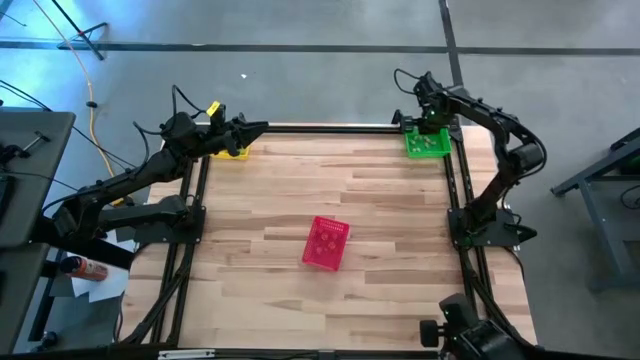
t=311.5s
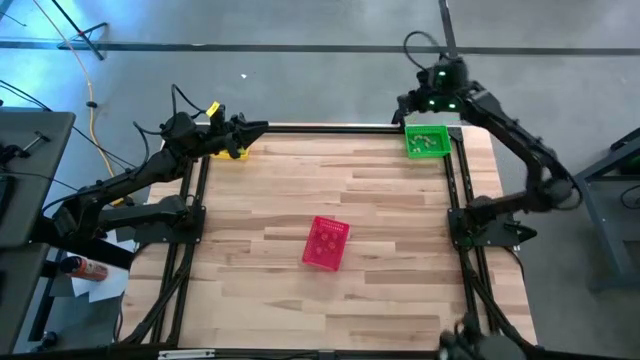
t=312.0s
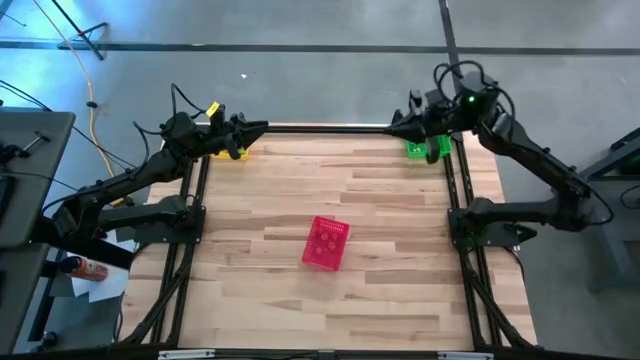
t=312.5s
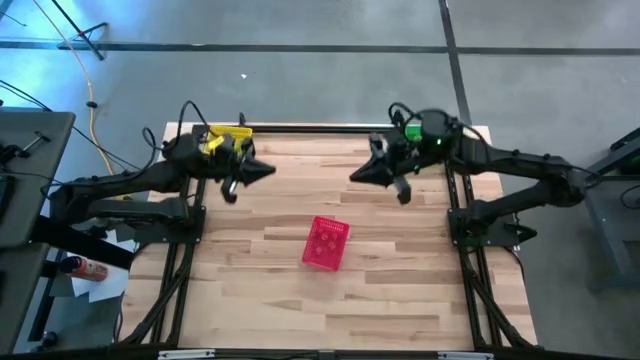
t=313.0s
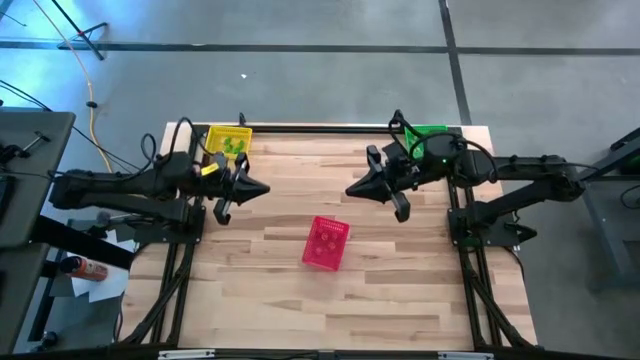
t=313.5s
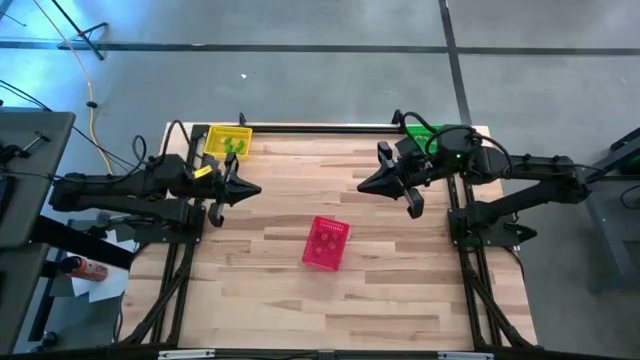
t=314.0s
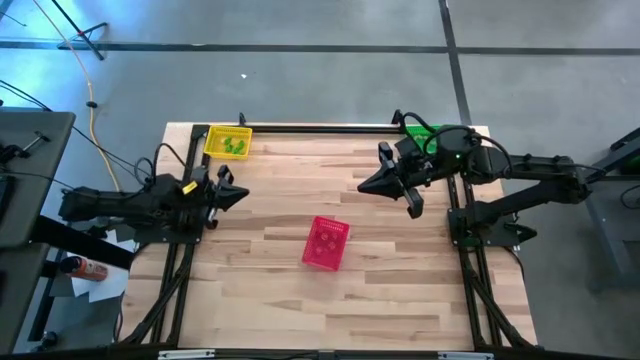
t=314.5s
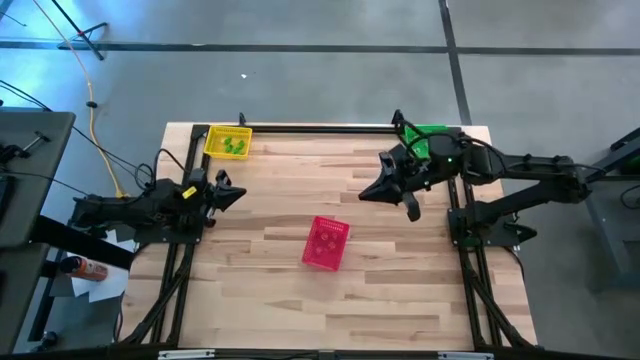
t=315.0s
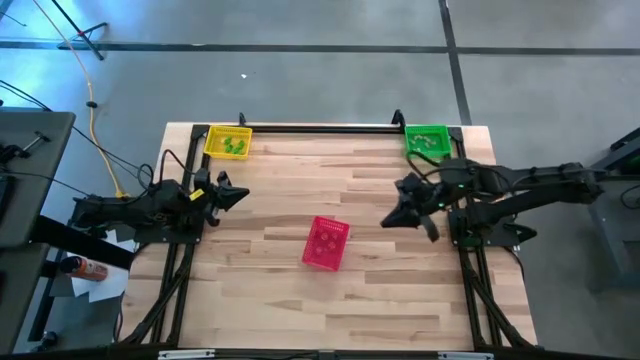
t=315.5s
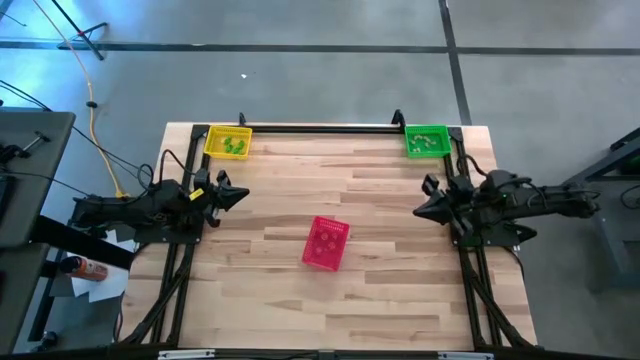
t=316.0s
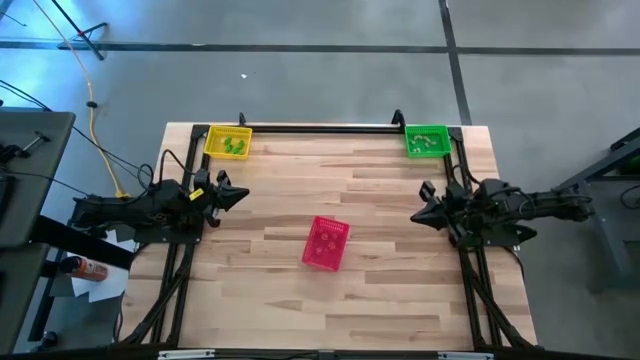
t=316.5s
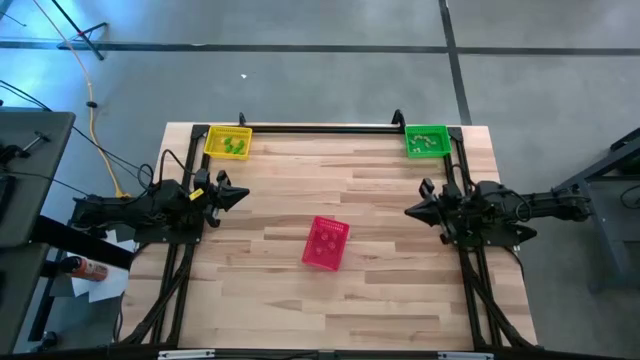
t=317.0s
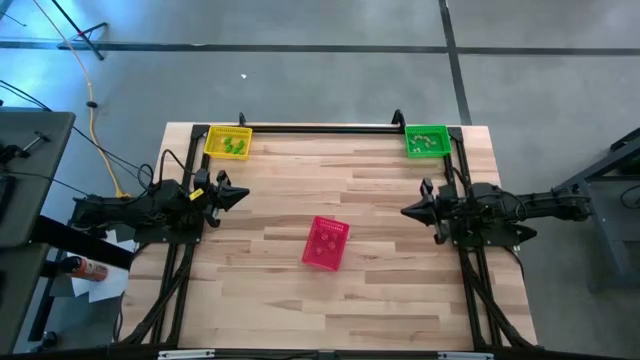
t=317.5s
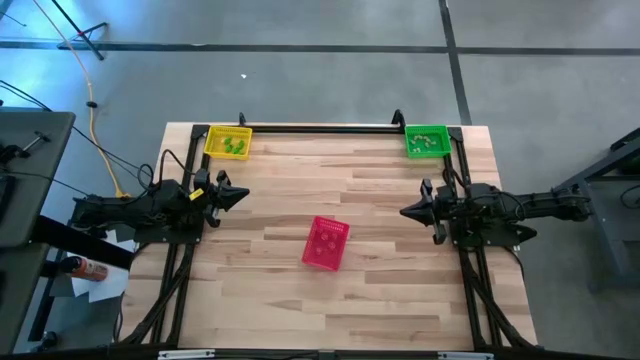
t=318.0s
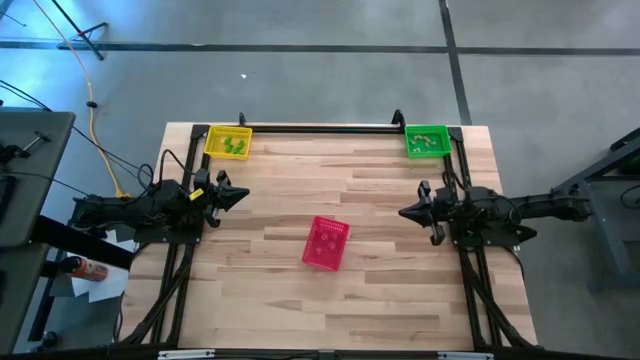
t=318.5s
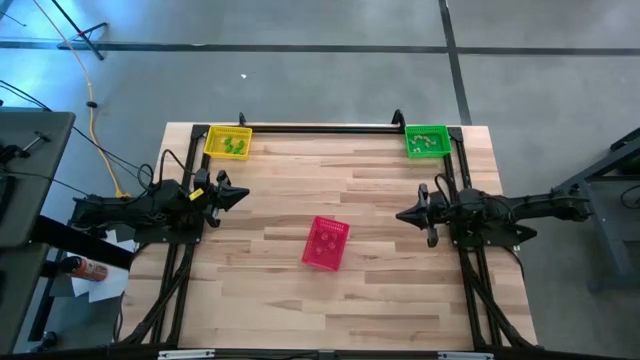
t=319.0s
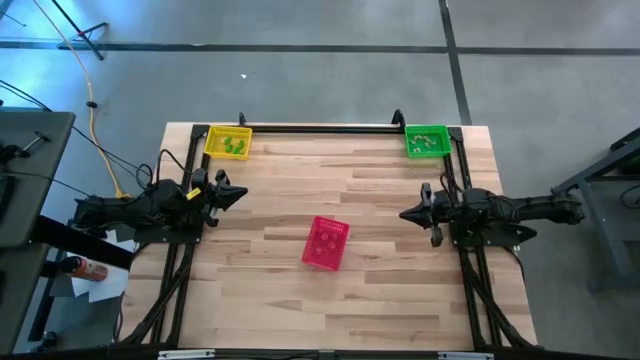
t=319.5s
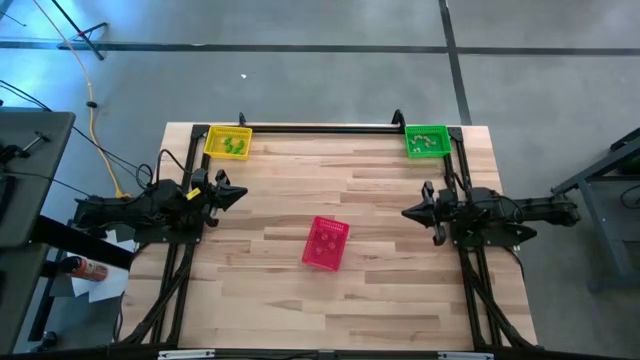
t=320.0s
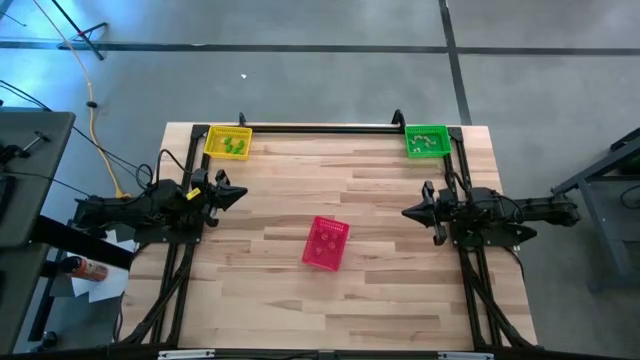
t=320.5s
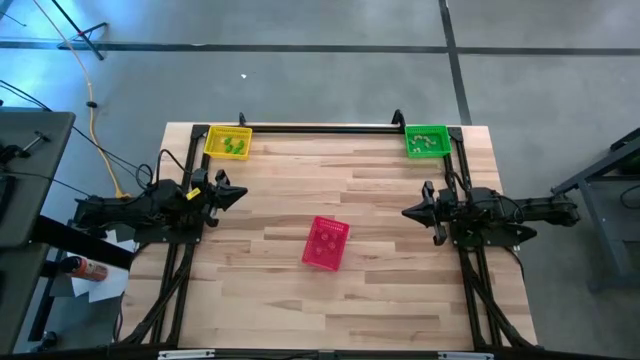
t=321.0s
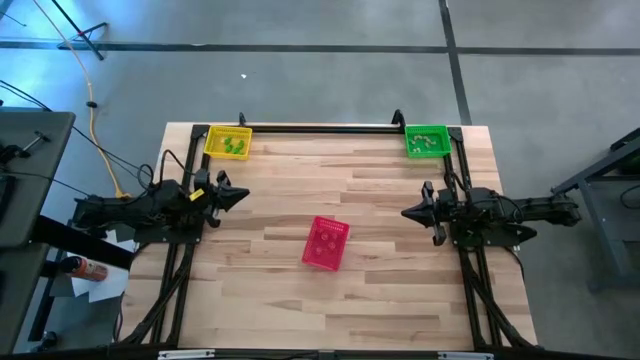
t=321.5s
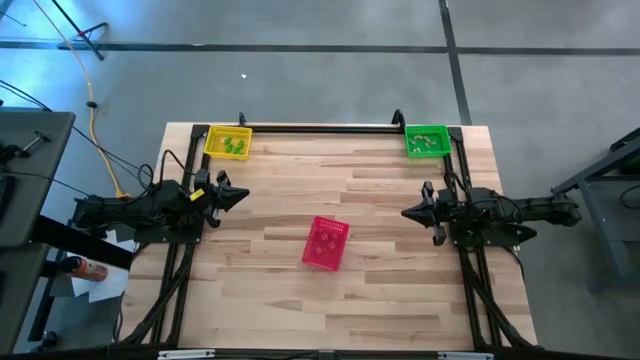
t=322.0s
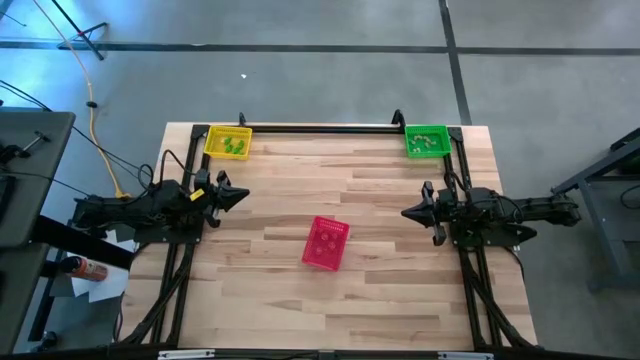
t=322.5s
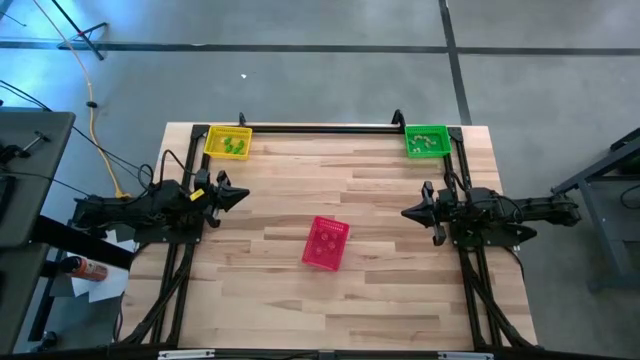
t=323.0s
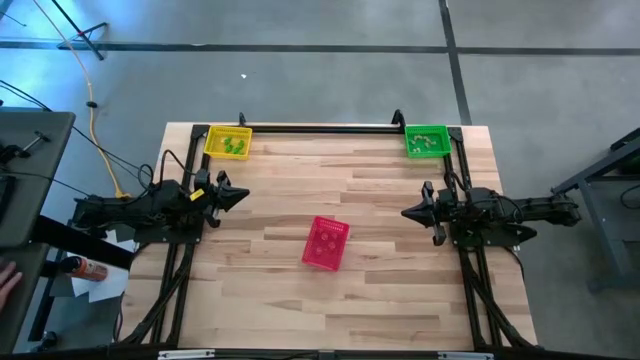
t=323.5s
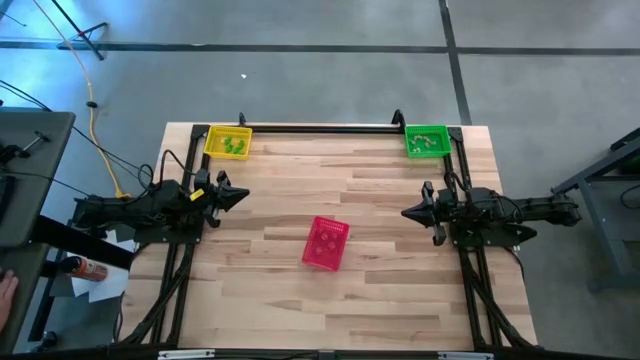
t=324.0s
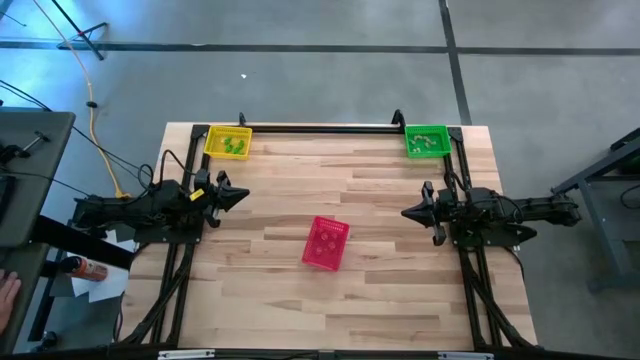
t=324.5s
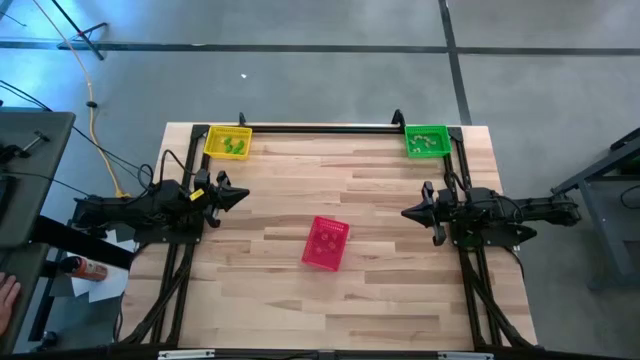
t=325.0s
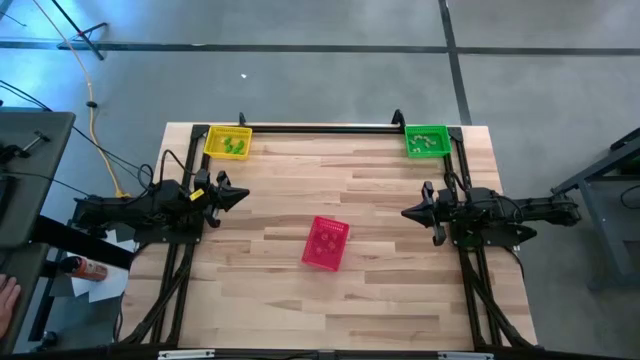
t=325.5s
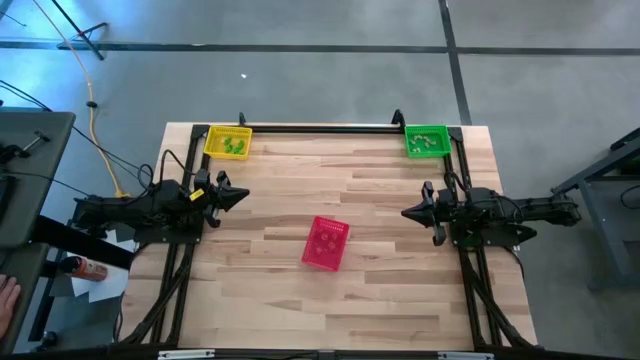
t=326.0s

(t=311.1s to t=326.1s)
Task: Sort Halloween decoration
Return to Home Position

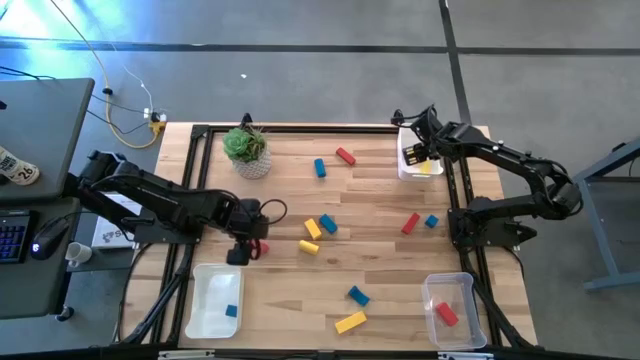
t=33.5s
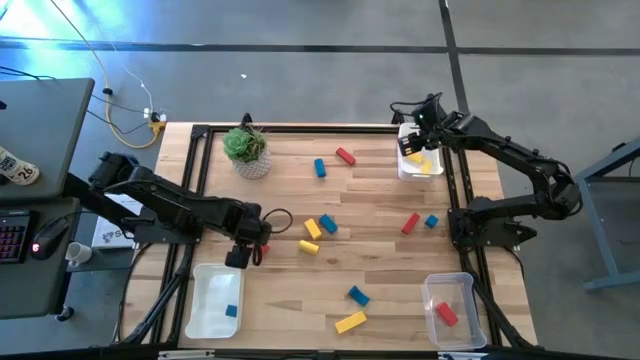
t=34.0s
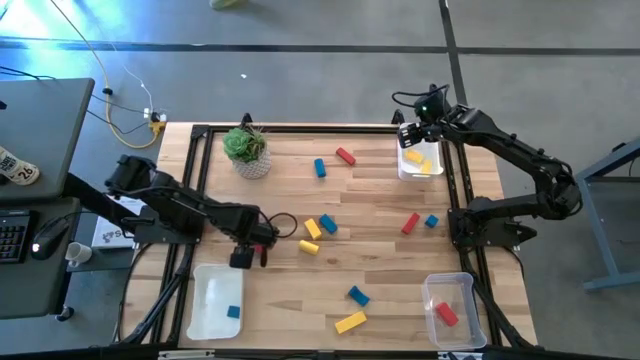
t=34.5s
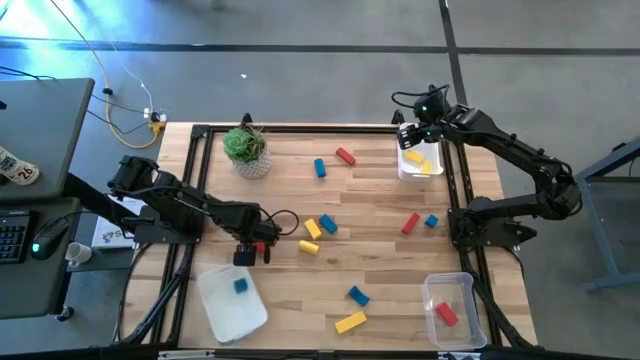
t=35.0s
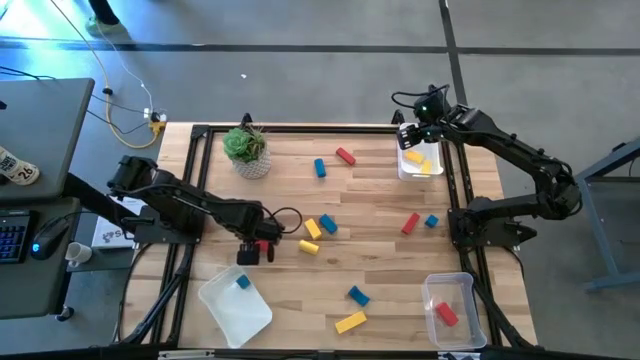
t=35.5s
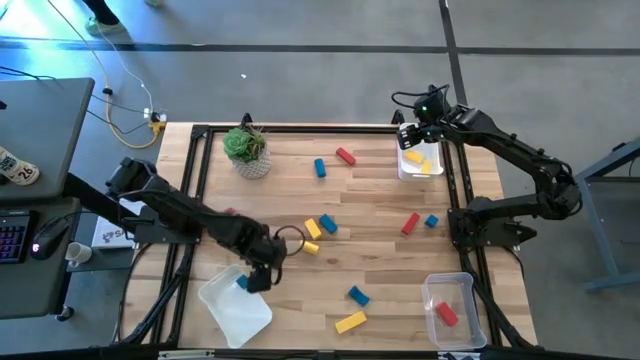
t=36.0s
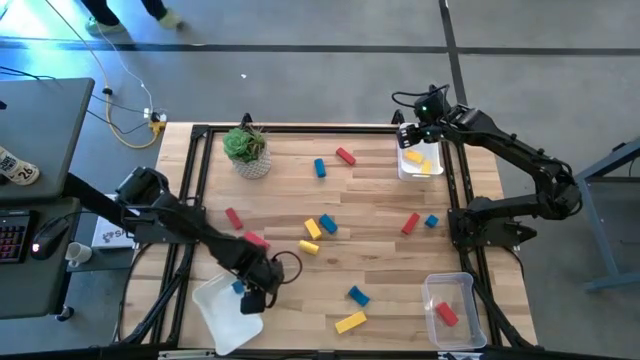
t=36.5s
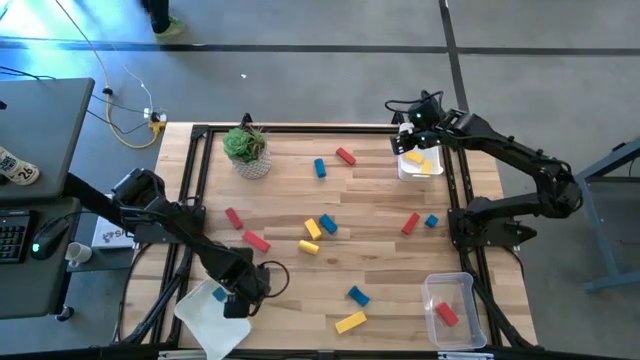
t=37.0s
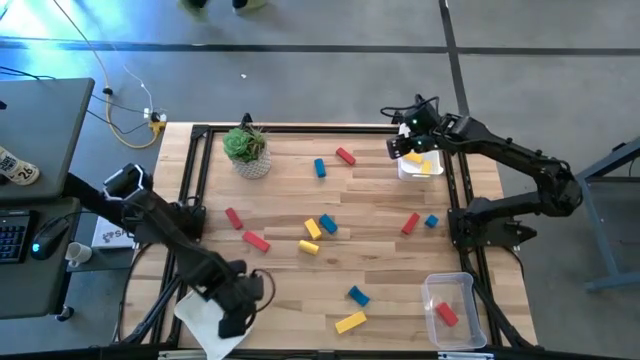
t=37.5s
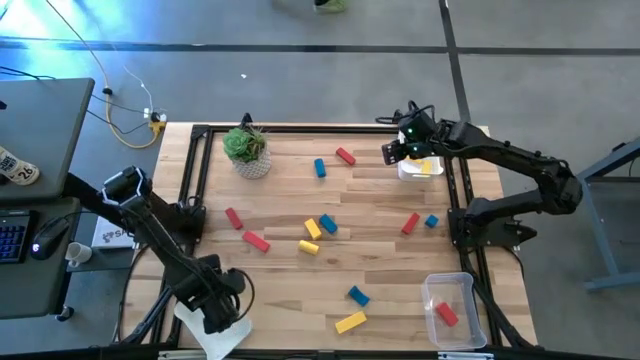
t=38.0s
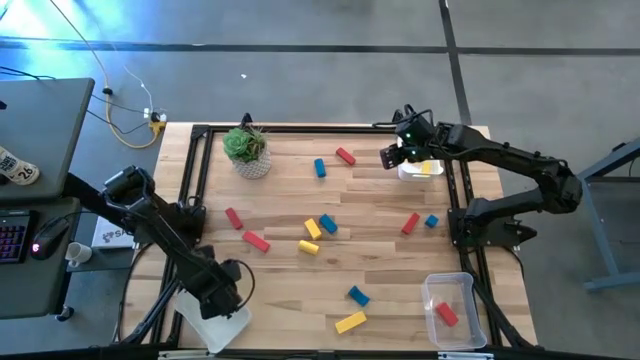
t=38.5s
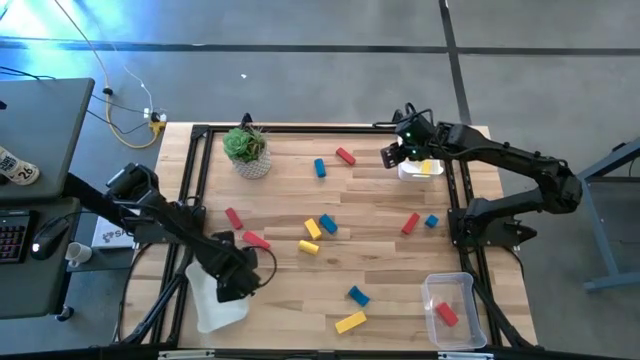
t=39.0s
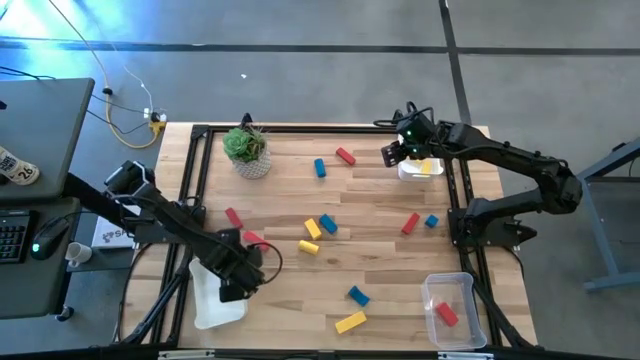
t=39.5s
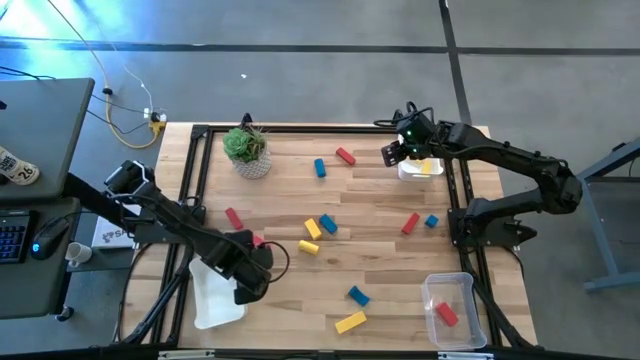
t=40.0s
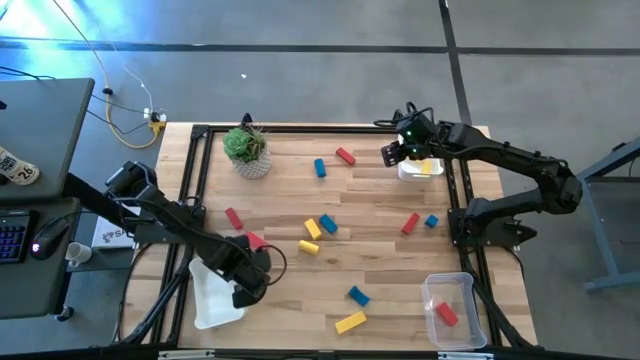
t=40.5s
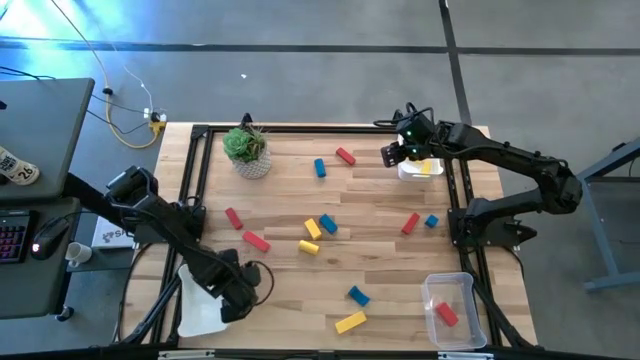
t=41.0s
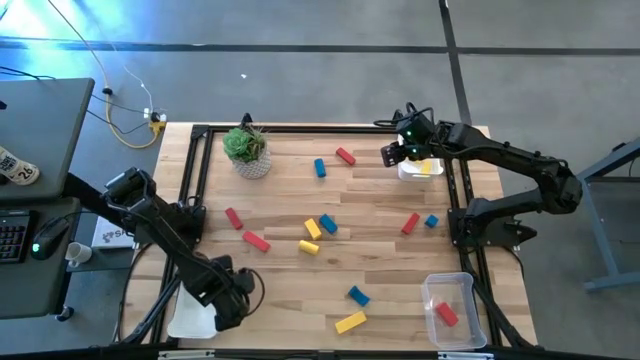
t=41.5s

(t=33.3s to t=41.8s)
Task: Sort & place blocks by color
Adjust the bottom white bin
